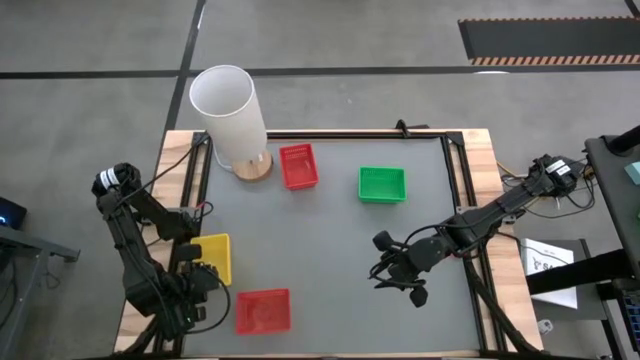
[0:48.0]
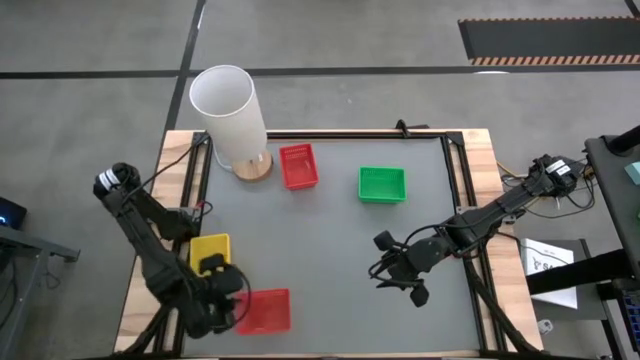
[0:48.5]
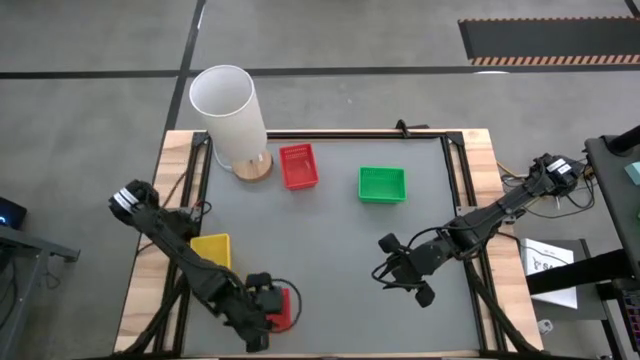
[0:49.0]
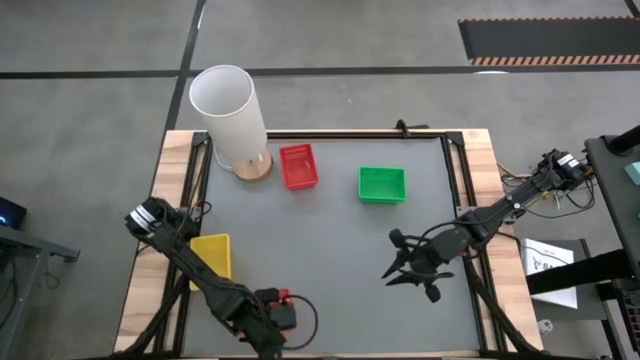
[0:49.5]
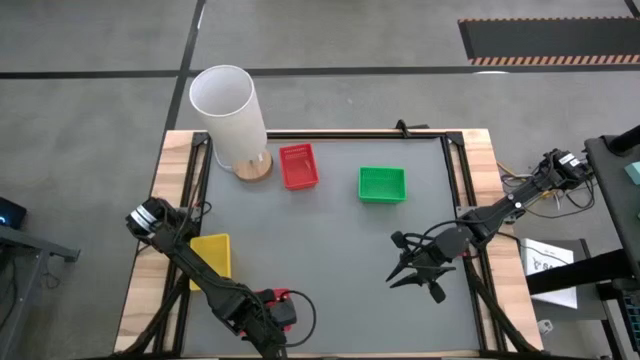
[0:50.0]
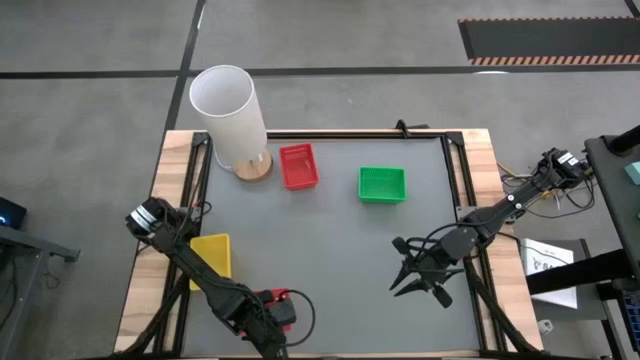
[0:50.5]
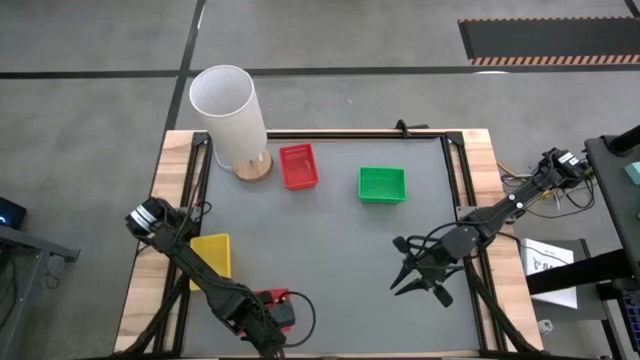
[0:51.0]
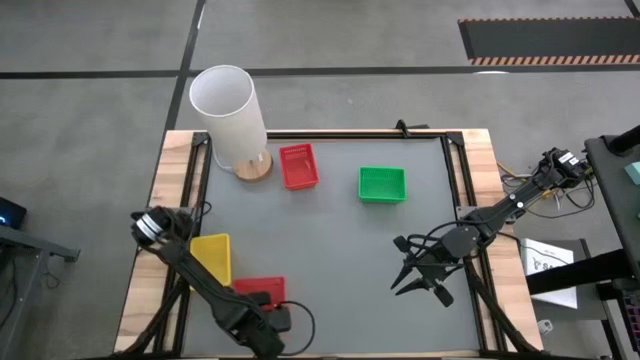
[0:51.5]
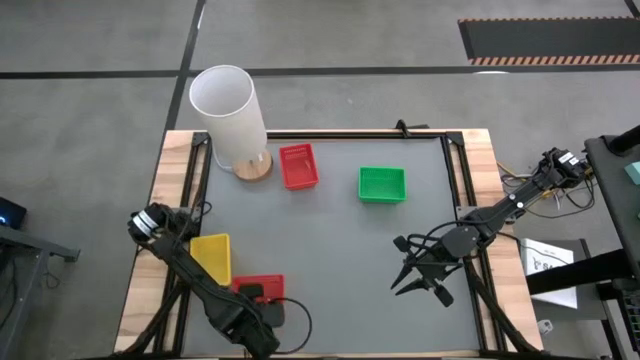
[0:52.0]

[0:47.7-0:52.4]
Stack the bottom red basket on the top red basket

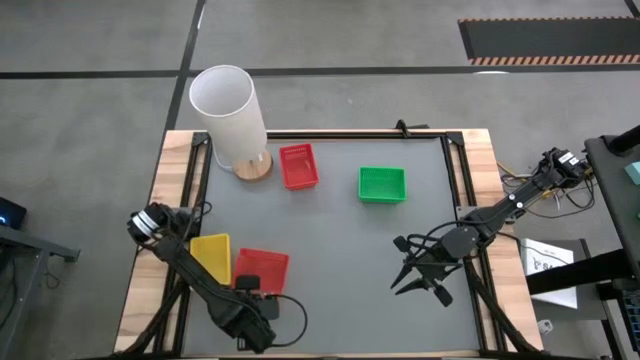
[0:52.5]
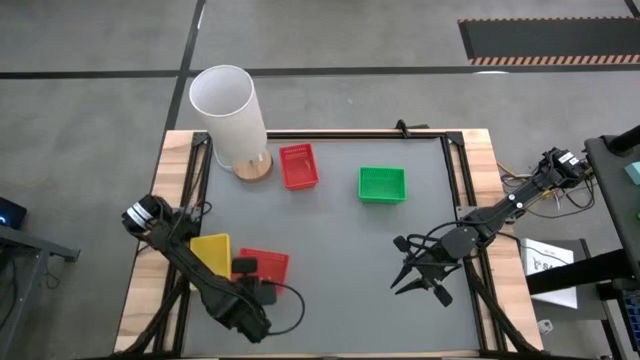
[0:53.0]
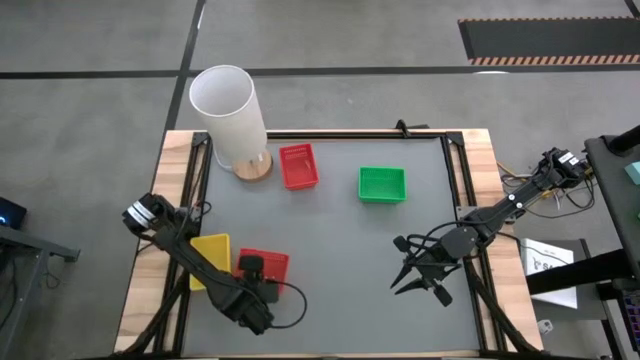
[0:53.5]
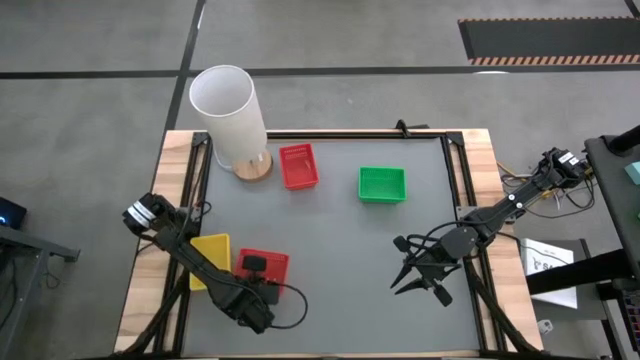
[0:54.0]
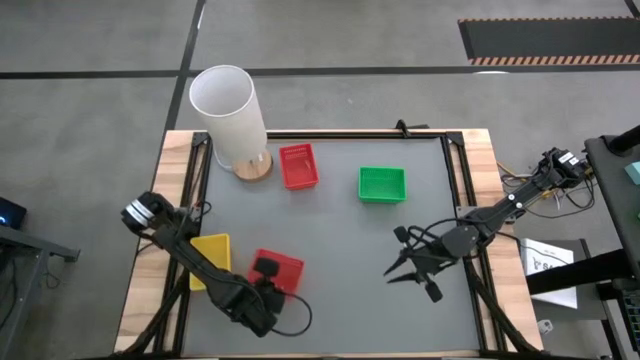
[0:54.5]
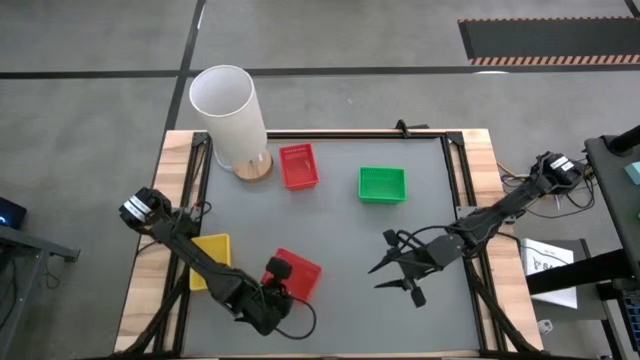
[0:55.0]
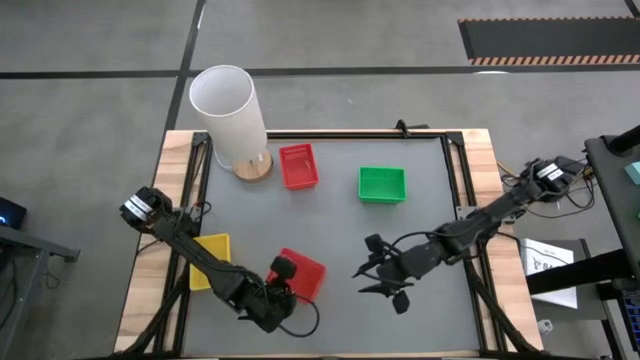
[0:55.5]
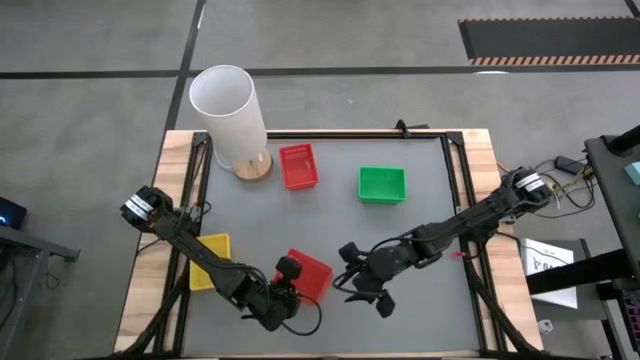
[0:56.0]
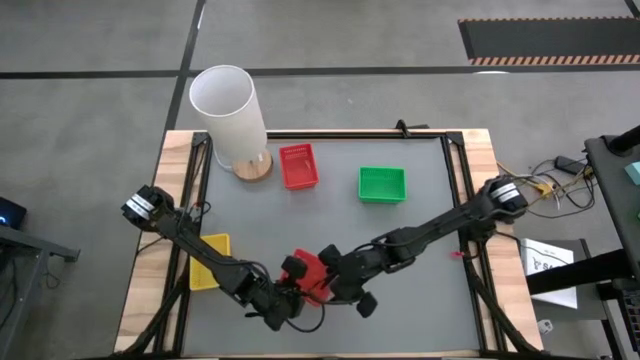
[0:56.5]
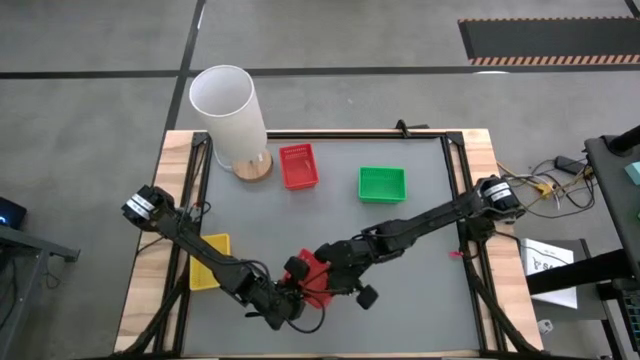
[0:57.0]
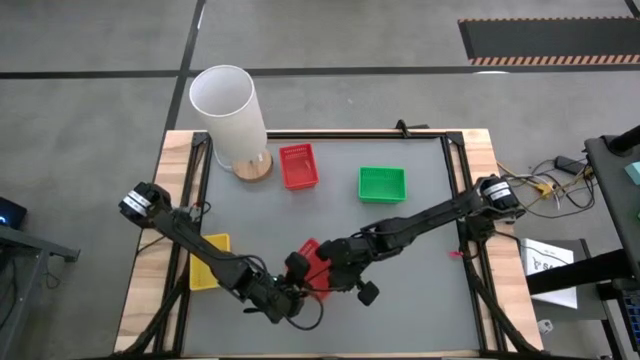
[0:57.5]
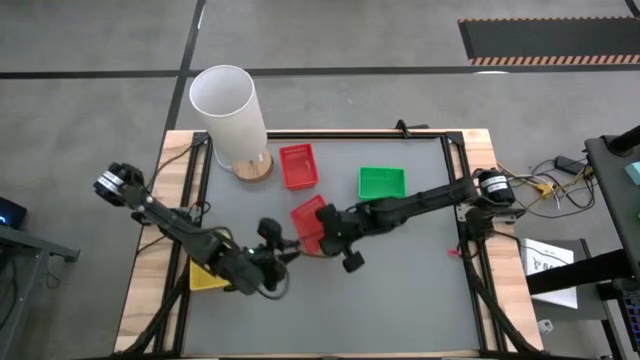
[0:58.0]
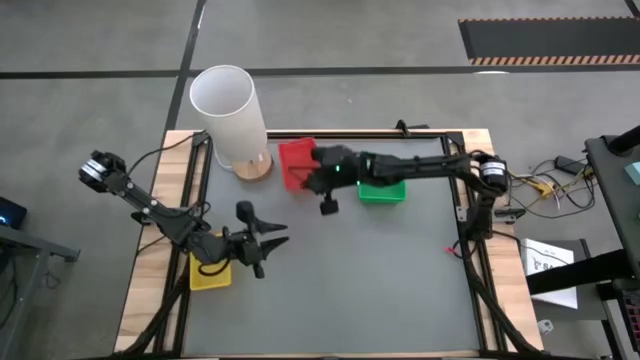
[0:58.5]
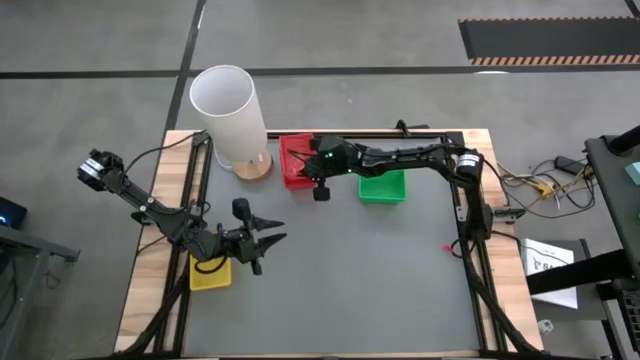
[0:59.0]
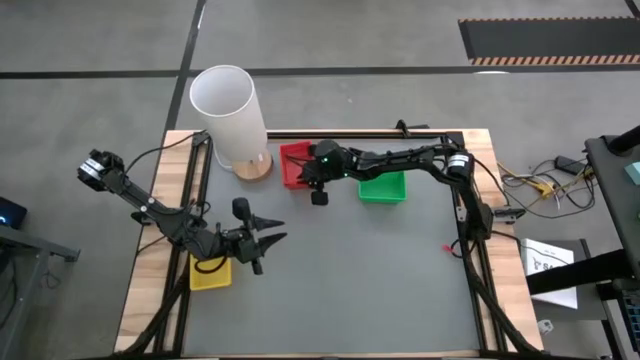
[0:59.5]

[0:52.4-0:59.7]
Stack the bottom red basket on the top red basket

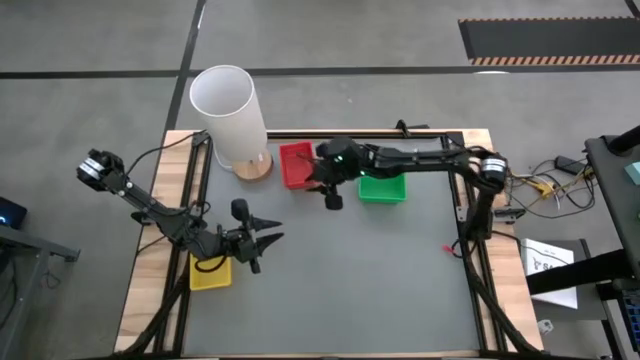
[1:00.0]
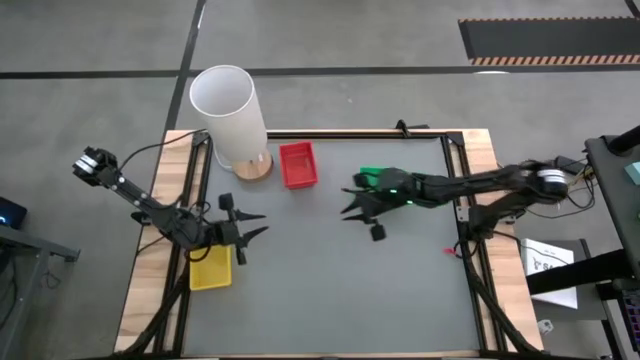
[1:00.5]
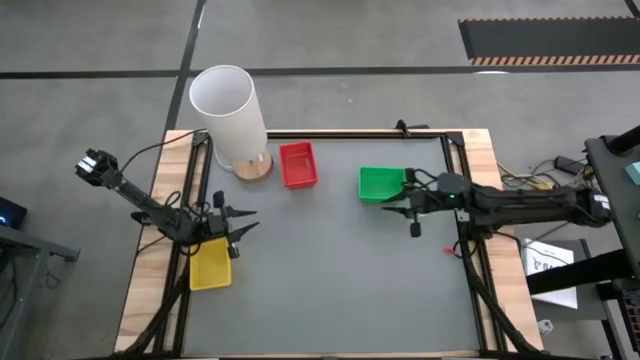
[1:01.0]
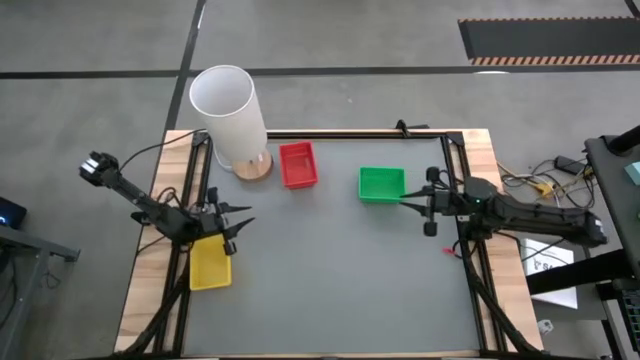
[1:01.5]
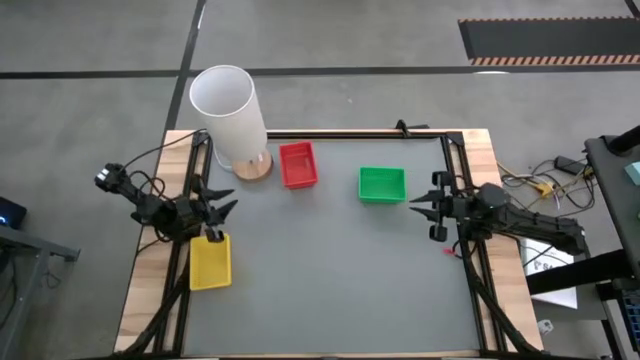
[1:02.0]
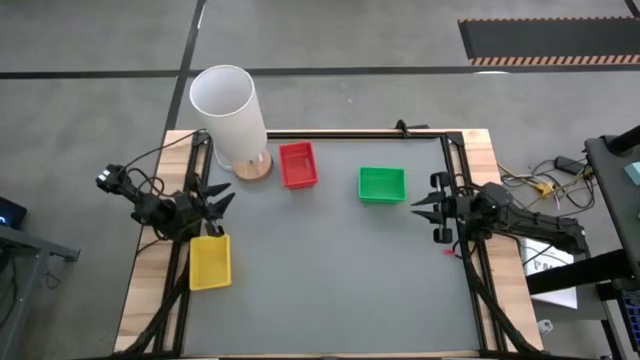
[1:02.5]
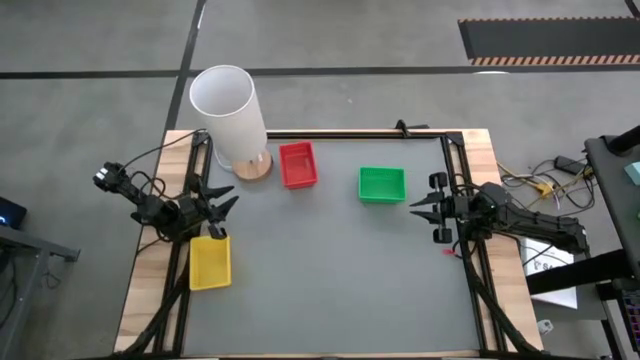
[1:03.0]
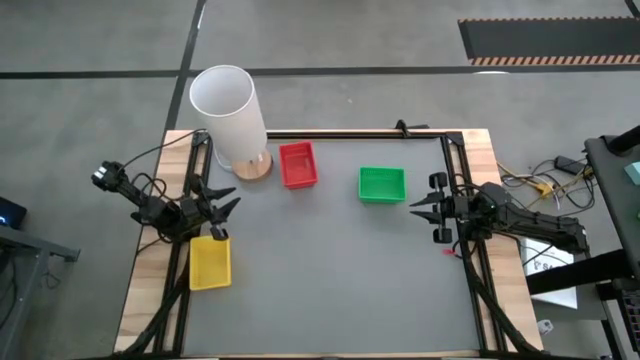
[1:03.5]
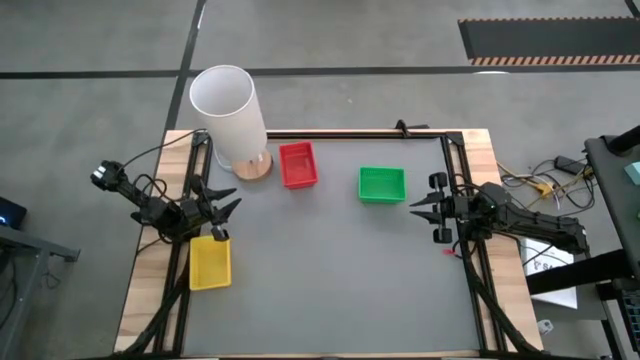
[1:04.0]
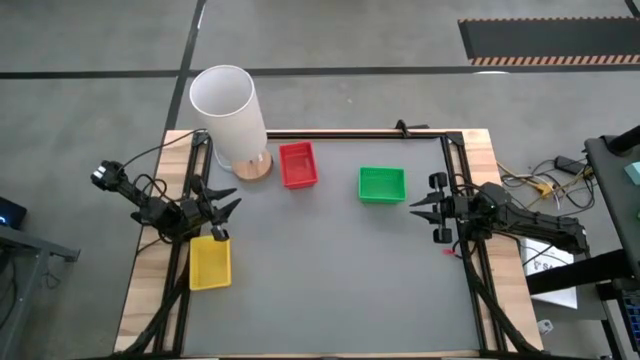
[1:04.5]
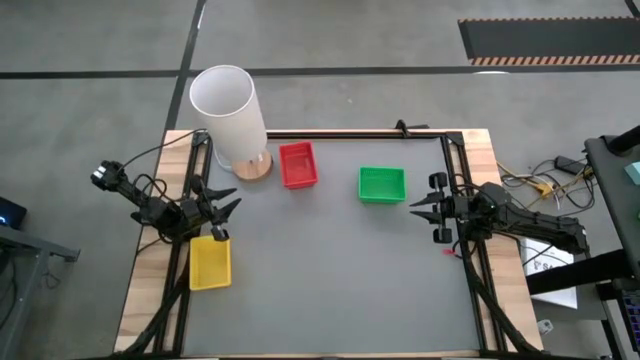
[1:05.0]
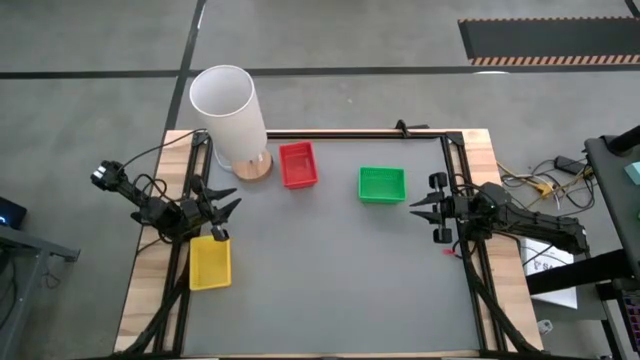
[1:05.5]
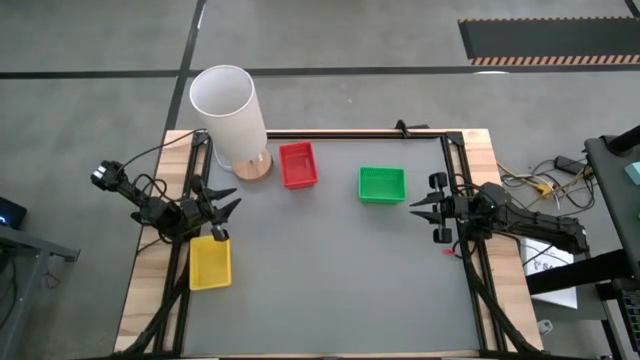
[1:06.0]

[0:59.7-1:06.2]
Return to Home Position
